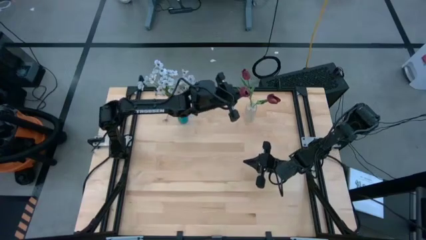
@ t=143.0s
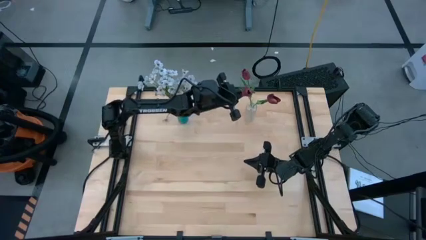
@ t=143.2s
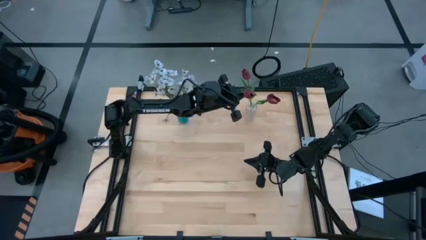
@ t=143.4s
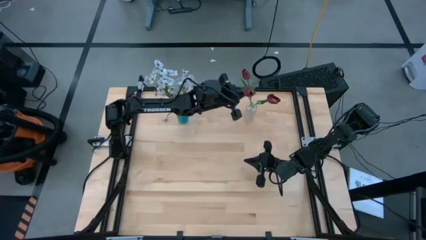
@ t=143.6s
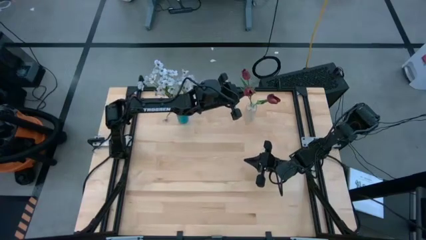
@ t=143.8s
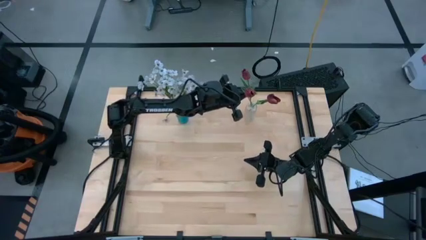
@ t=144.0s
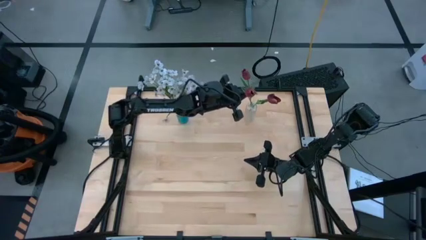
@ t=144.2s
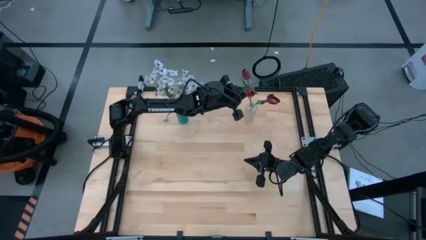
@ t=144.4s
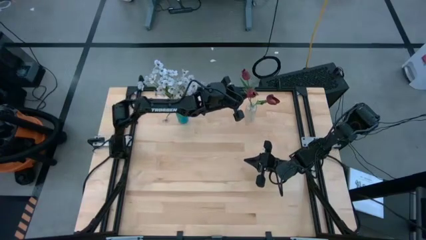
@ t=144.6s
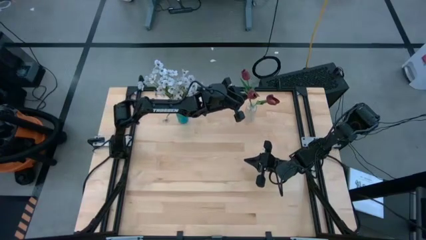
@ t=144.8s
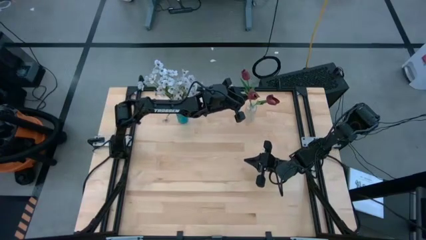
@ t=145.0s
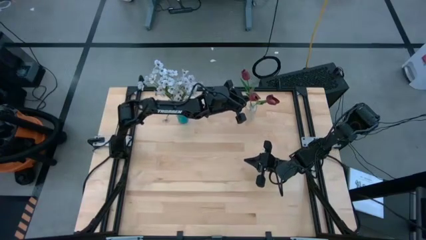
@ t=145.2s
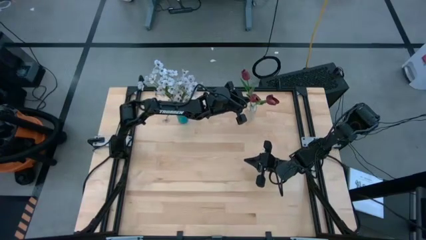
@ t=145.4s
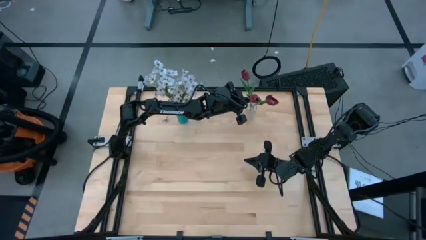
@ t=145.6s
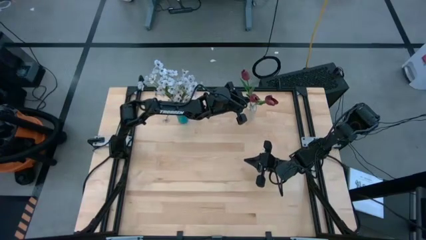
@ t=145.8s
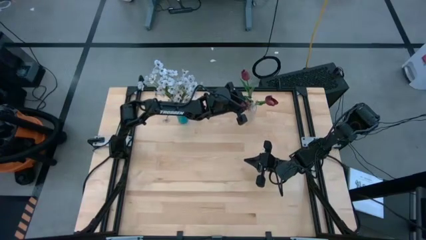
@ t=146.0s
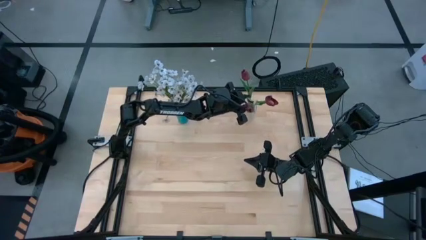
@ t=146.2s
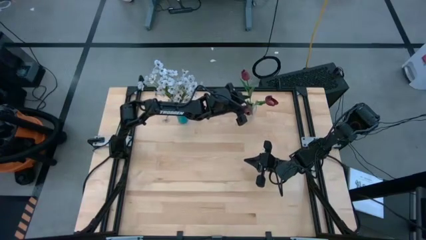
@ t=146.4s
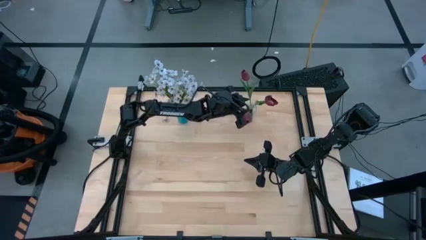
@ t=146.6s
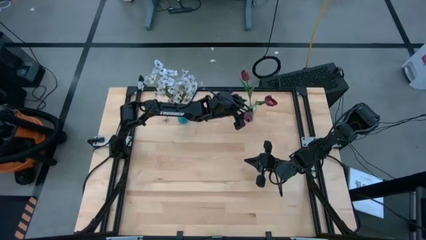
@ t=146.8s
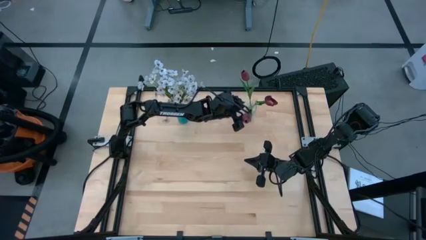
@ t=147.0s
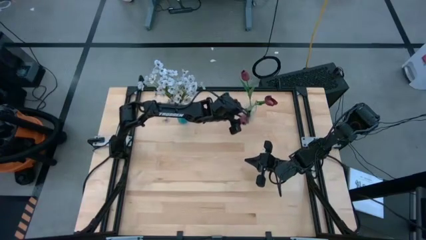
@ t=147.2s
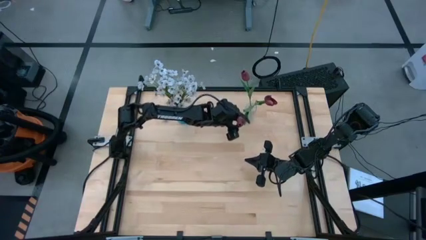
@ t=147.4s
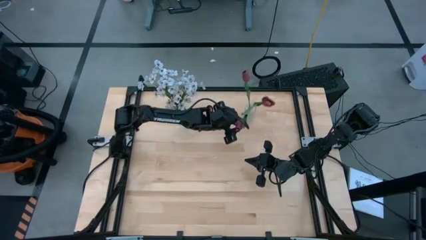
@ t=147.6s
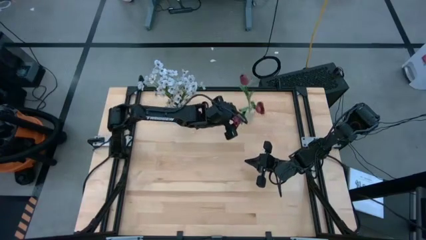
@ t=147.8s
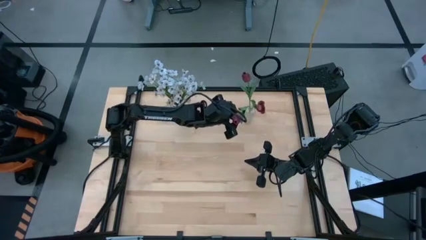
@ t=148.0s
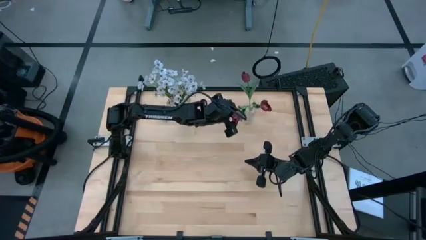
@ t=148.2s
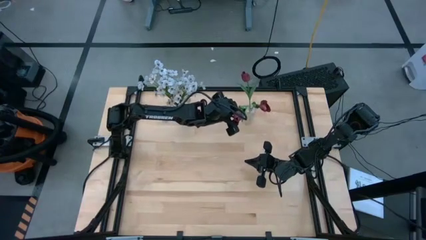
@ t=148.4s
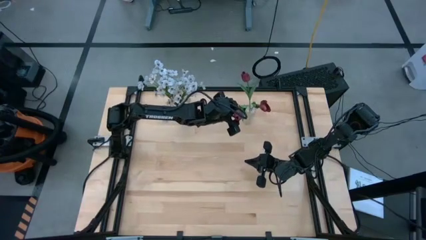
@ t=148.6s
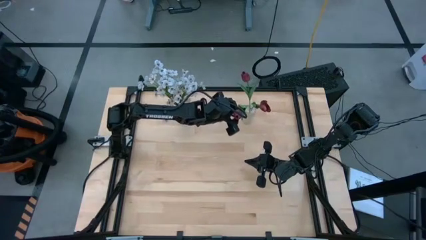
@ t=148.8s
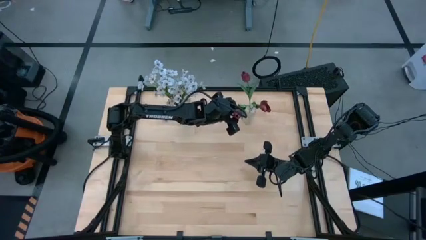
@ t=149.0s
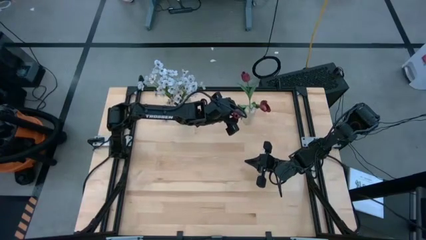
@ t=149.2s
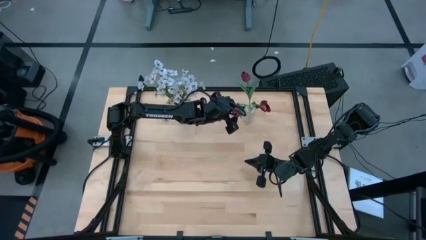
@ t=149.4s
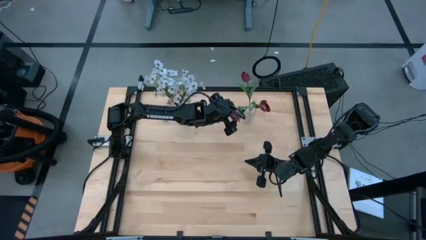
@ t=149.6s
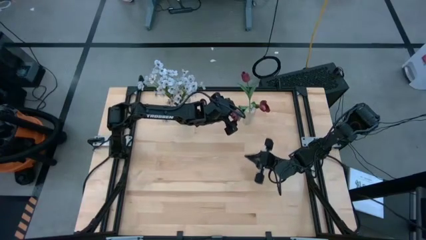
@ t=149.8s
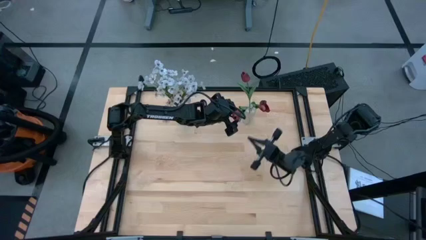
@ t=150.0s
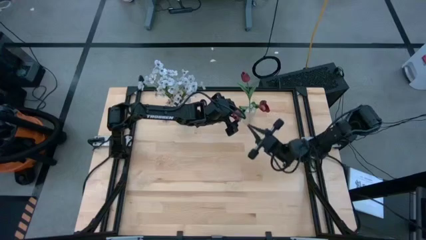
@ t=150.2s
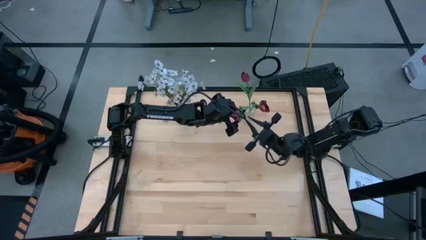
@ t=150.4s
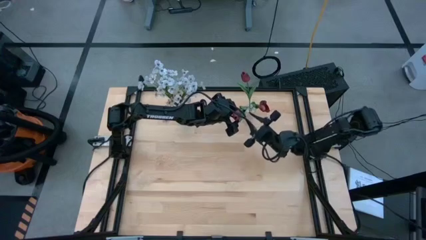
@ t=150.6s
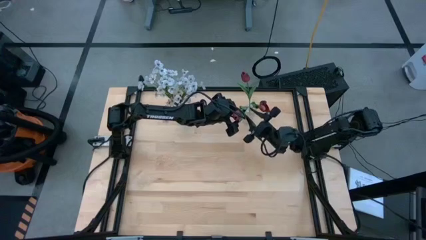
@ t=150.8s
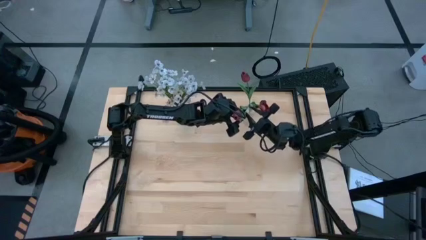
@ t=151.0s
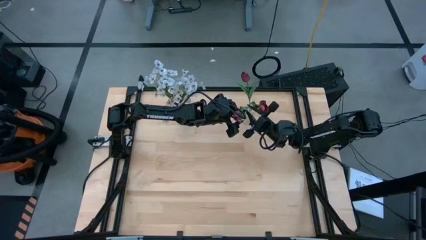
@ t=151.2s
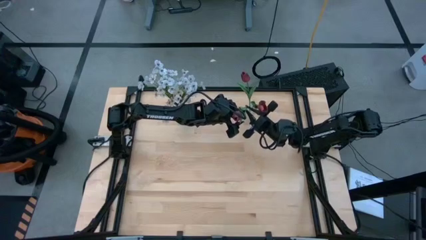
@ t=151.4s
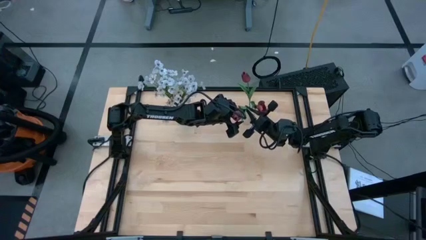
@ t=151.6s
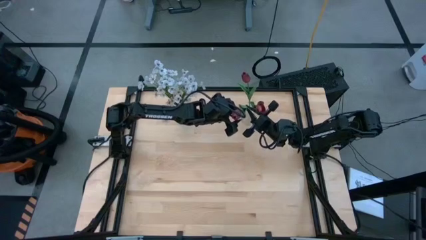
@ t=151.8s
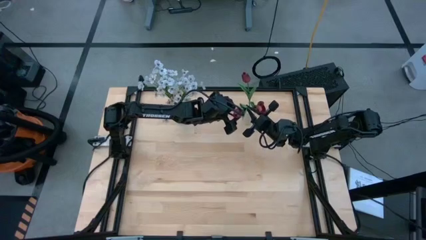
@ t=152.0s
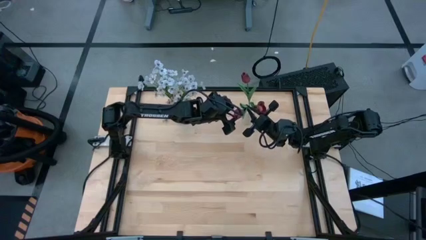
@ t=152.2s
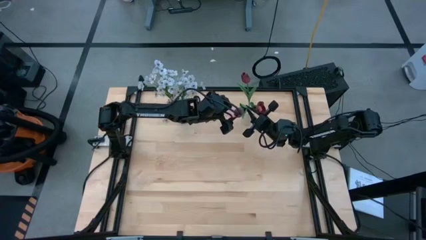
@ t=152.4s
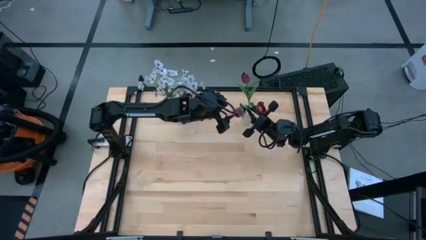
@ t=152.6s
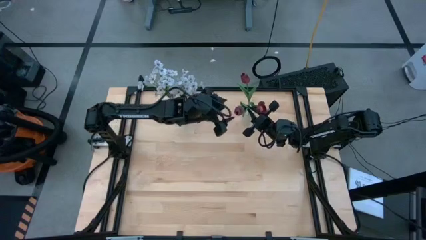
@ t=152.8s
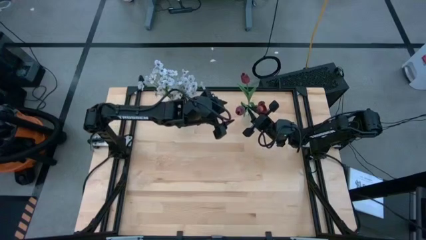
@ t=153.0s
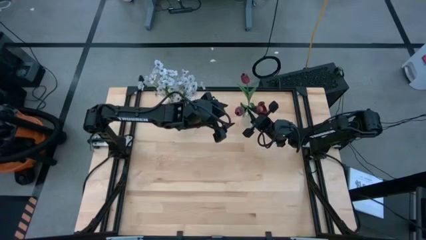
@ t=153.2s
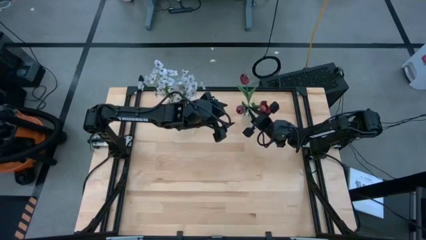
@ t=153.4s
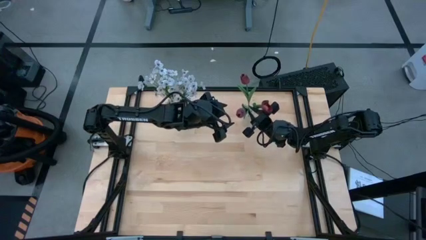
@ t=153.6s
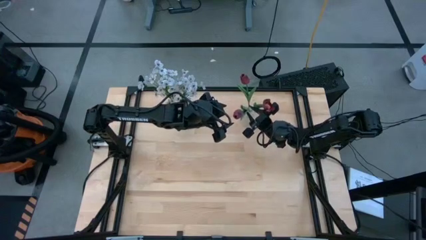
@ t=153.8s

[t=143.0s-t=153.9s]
Task: Sort flowers into vase by color
Put the red tulip into the transparent vase

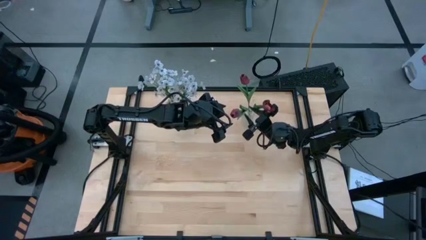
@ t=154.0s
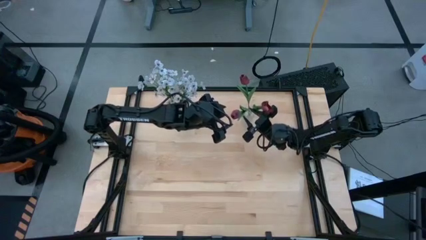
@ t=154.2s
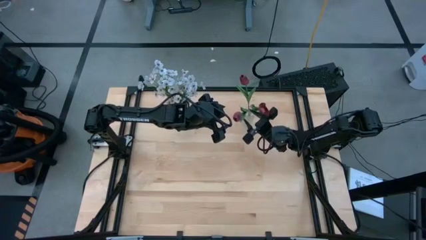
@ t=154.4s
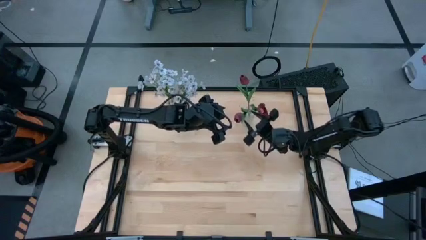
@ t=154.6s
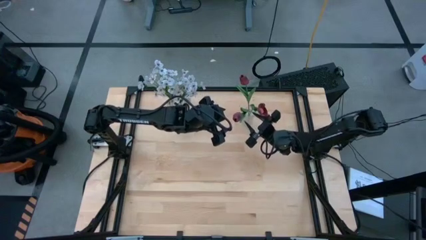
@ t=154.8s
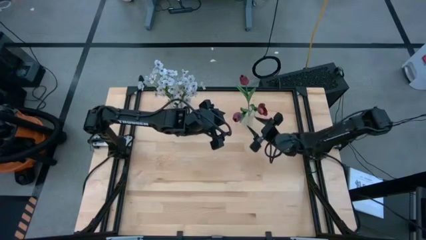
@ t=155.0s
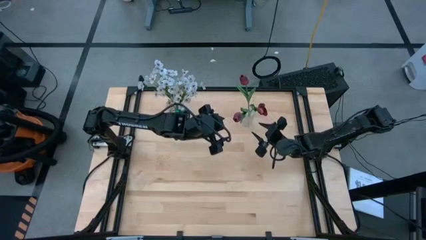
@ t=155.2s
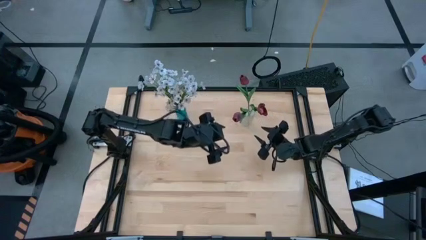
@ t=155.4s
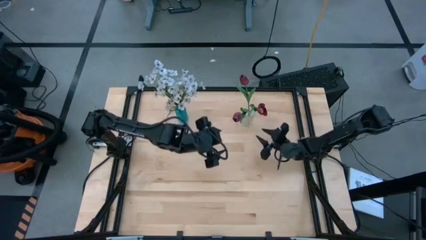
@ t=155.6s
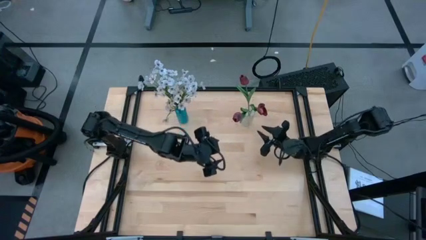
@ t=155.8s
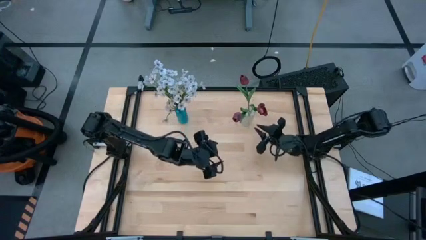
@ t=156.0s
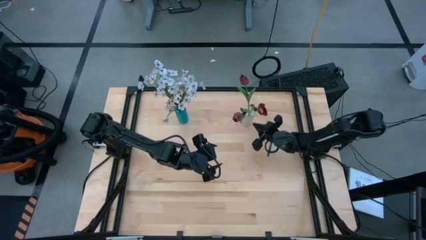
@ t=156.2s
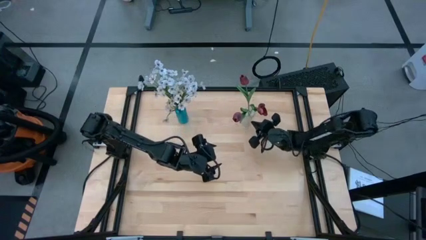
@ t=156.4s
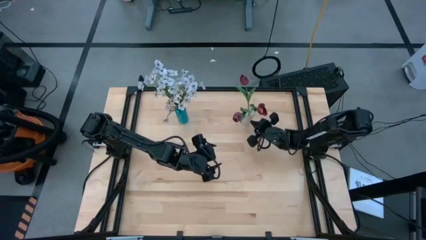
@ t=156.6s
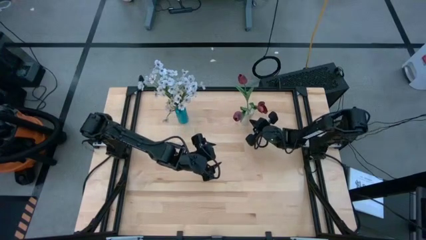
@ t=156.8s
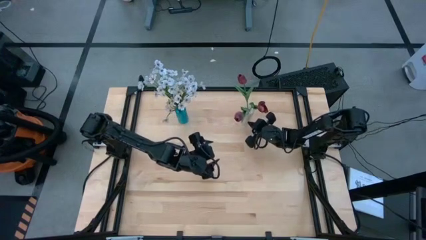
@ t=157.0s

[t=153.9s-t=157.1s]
Adjust the transparent vase

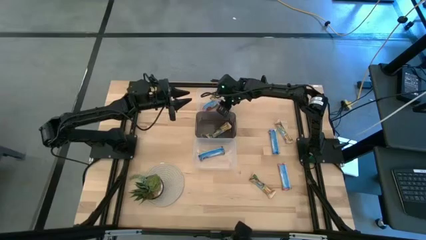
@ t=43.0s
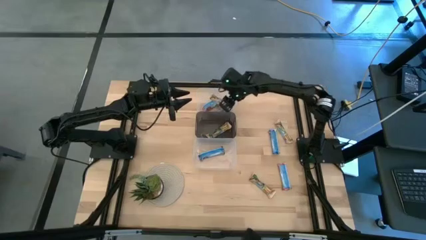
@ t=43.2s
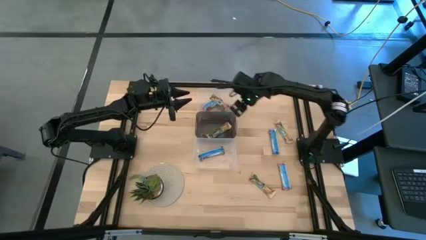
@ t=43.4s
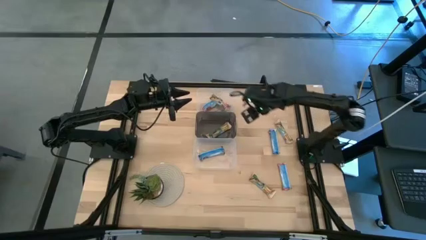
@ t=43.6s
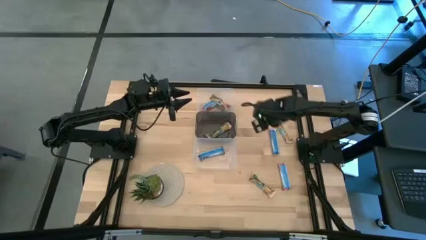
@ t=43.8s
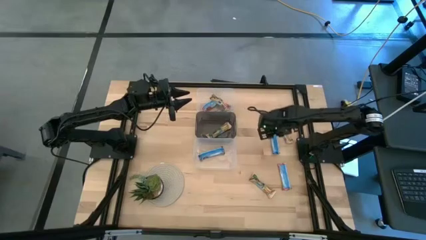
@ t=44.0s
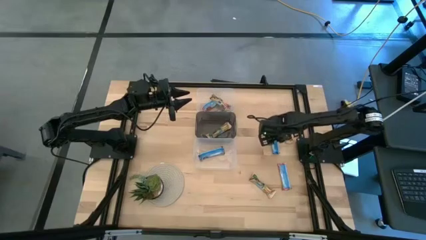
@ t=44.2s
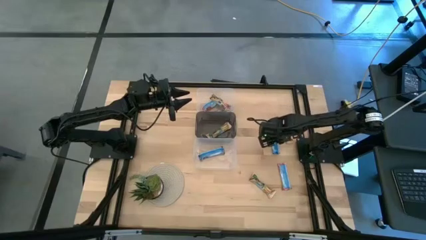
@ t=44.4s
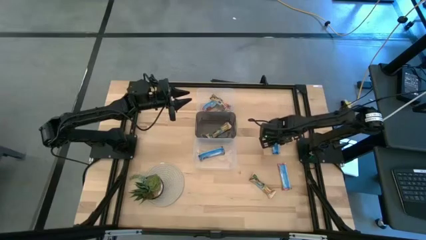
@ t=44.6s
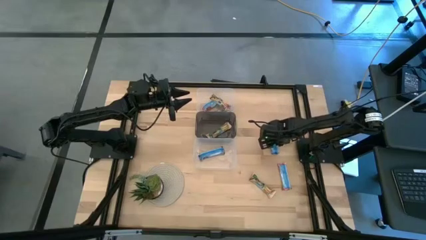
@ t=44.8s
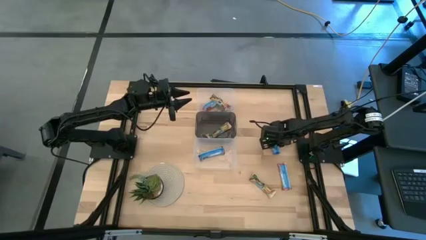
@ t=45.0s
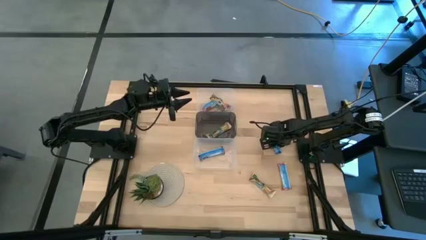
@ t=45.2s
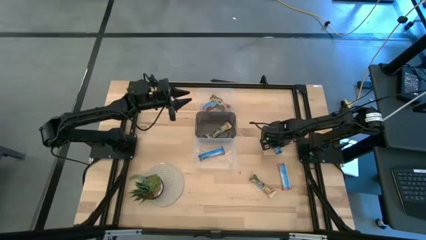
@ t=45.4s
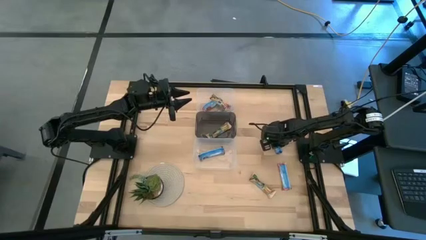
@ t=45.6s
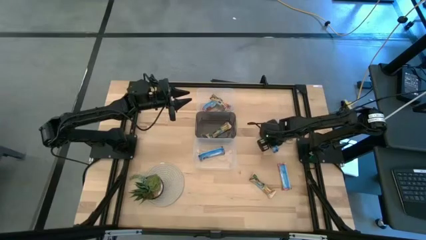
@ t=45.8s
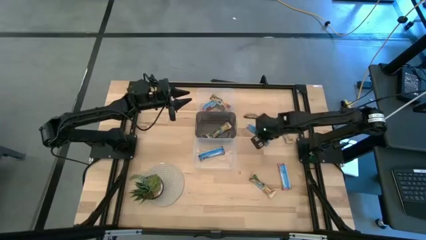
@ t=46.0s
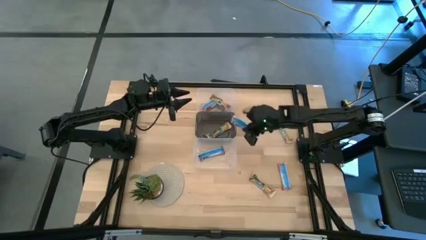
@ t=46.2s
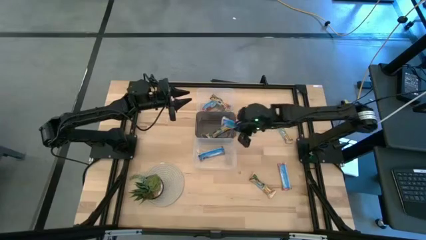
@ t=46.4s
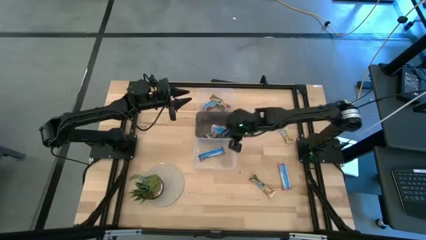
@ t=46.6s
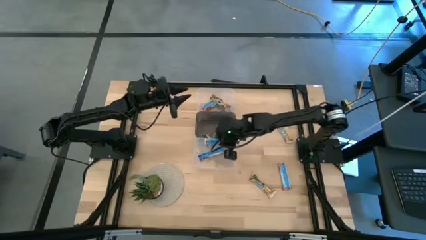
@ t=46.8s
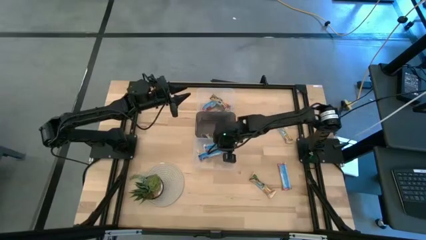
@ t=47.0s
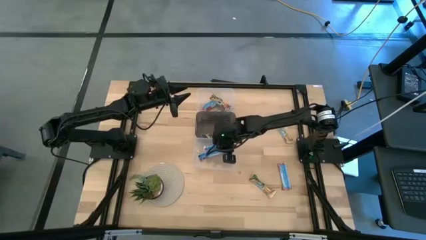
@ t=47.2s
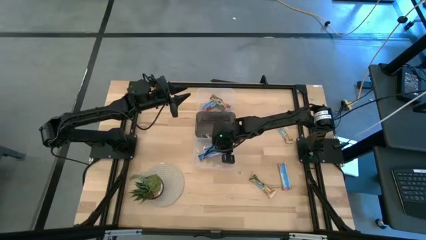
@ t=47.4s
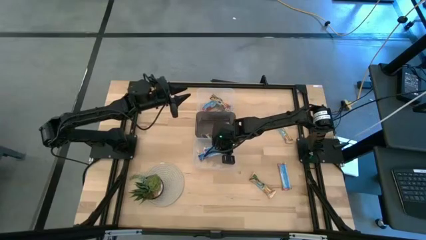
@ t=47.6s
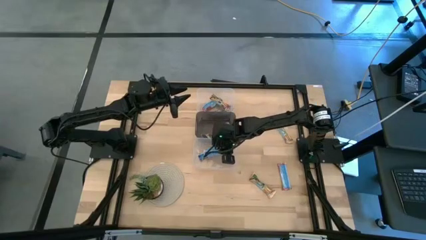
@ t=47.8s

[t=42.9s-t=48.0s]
Task: Pick and place Granola Bars by type
Put the blue granola bar into the bottom transparent bin
